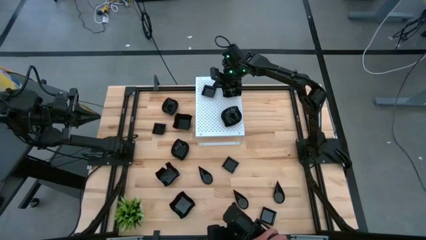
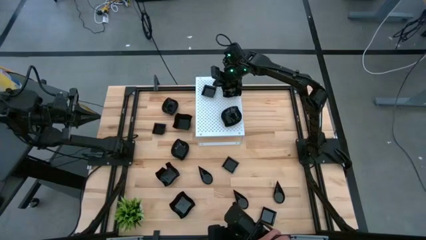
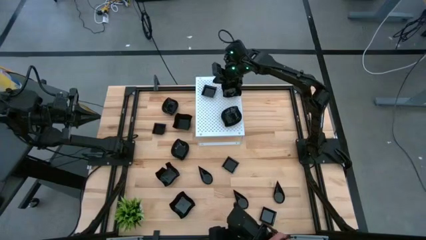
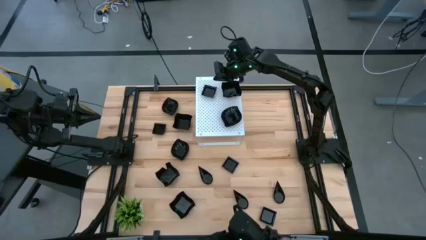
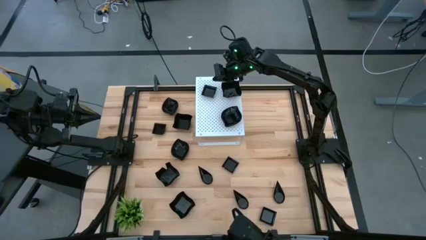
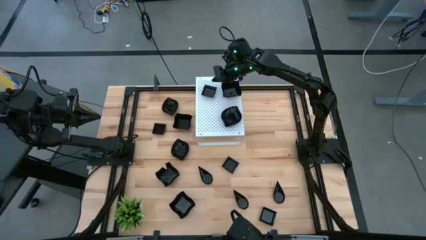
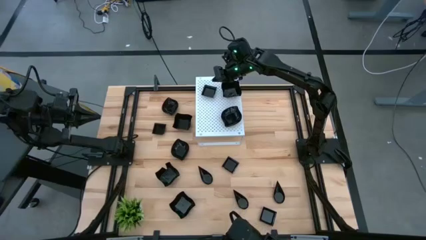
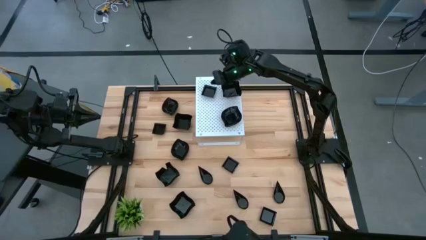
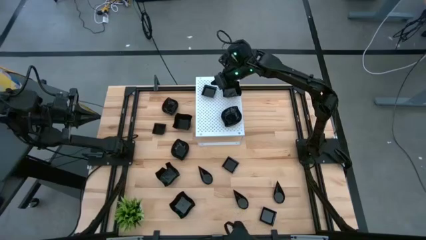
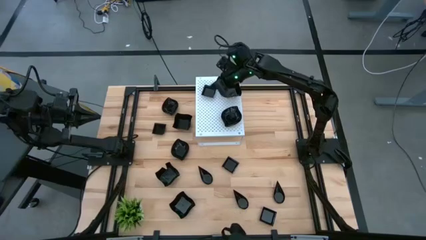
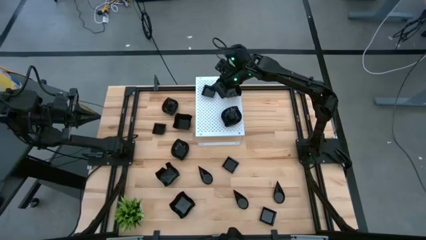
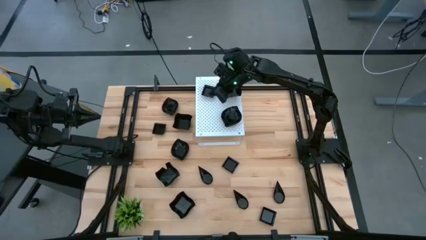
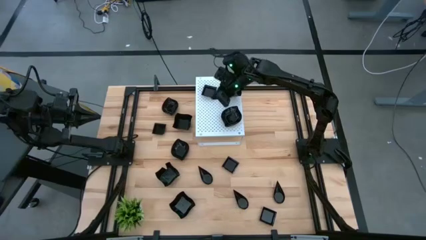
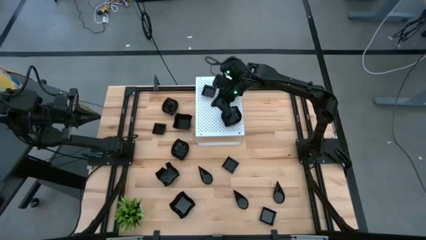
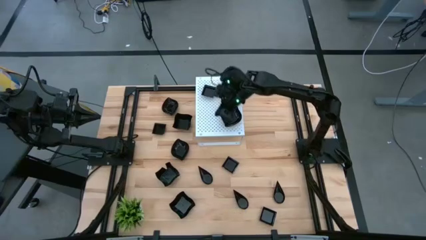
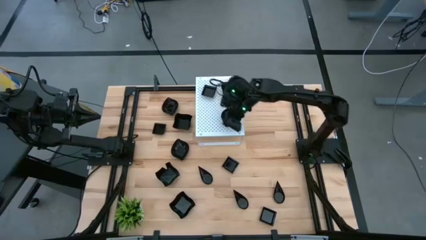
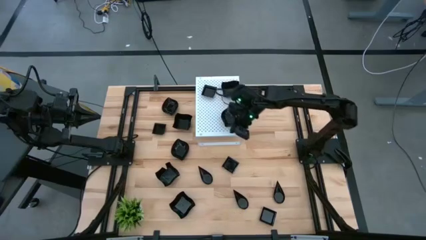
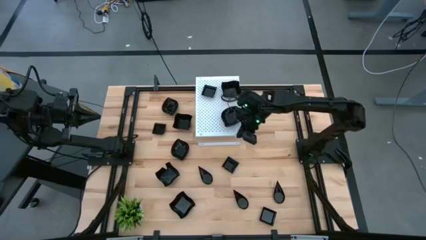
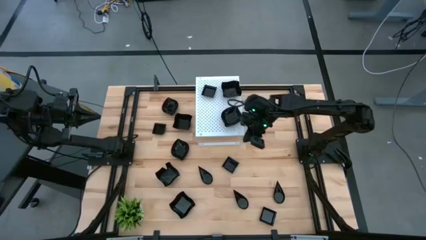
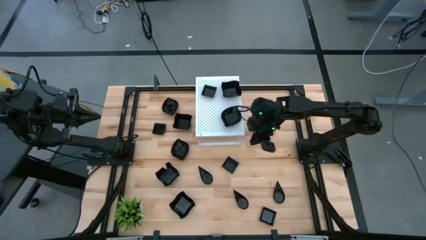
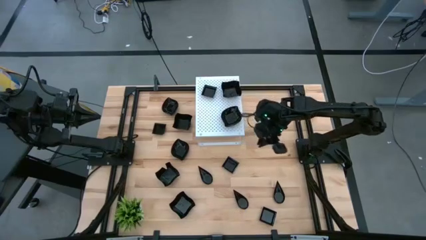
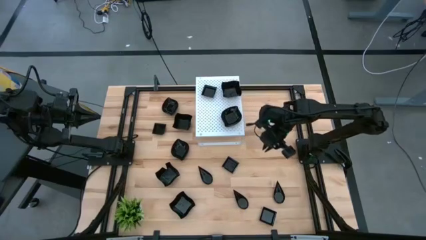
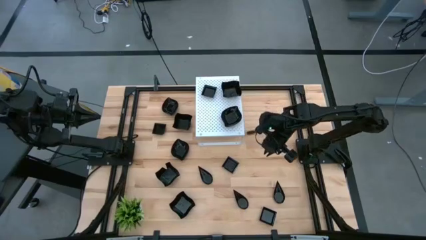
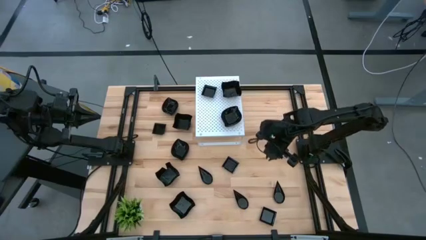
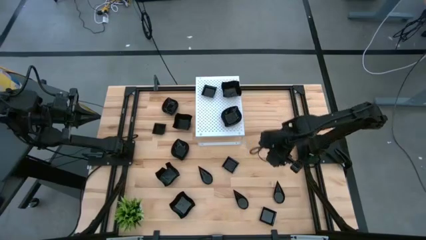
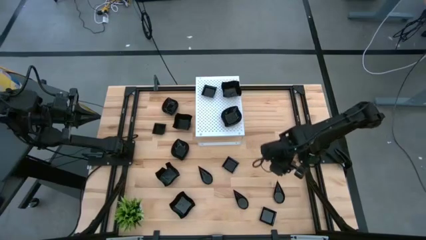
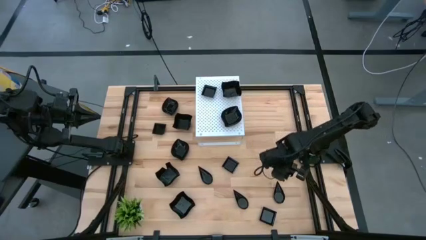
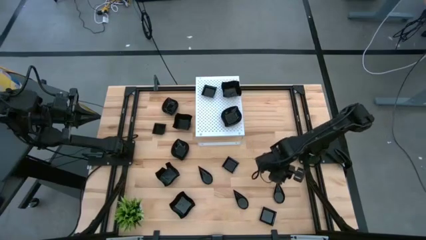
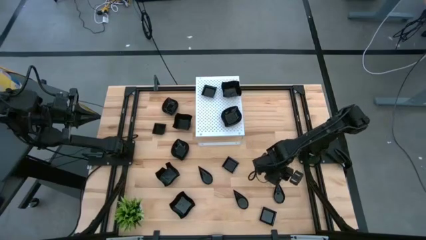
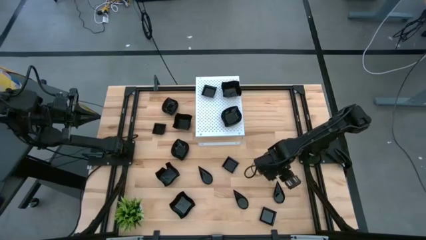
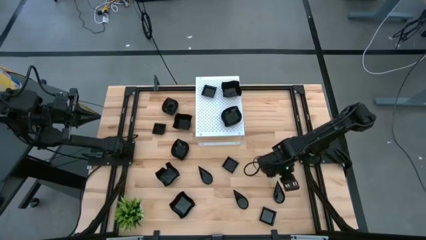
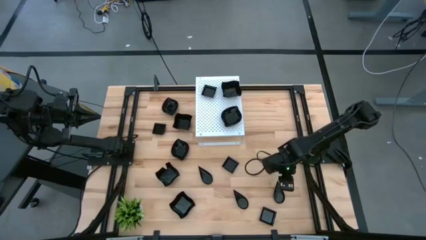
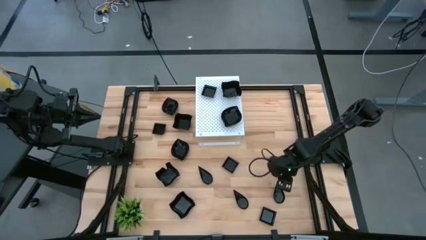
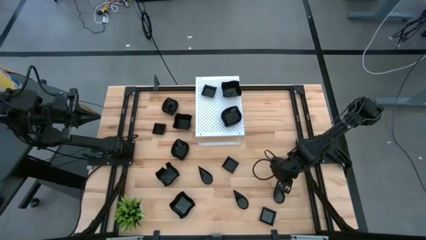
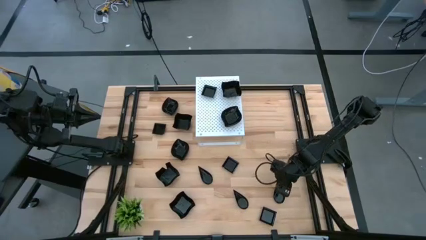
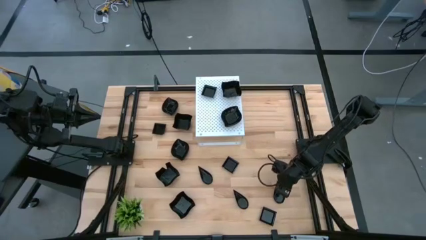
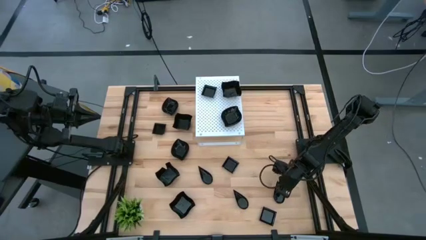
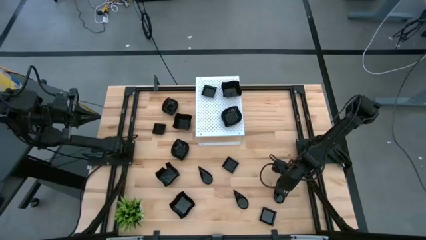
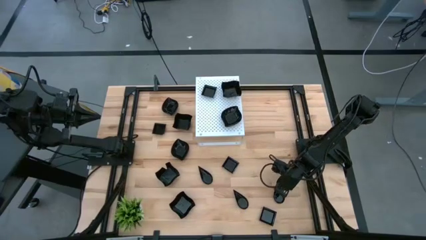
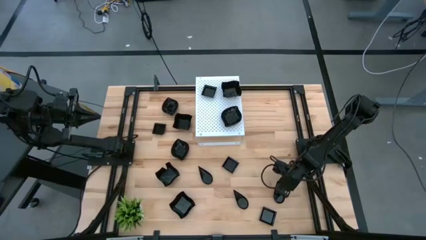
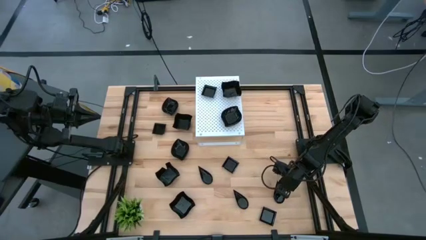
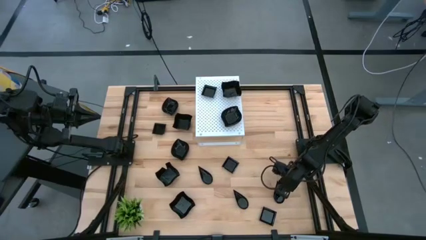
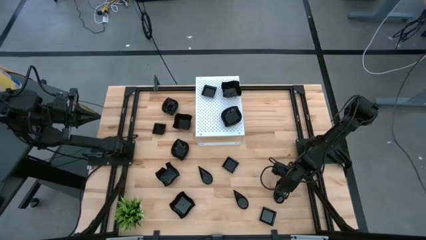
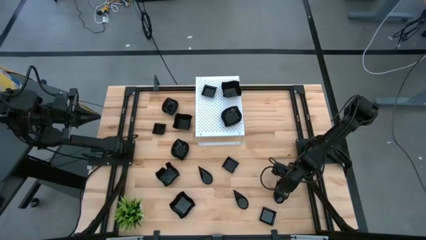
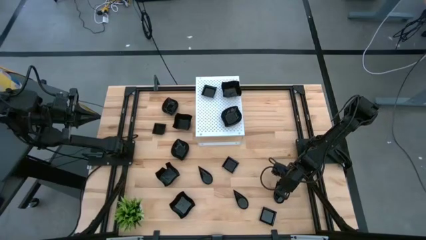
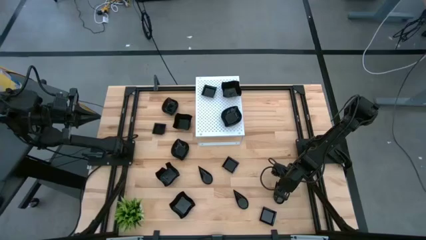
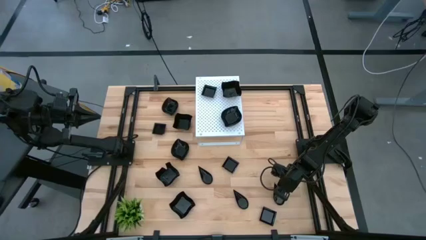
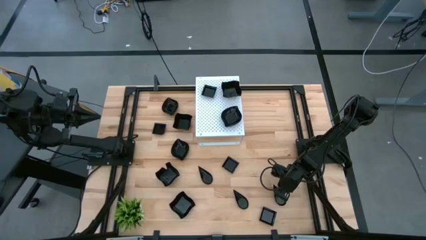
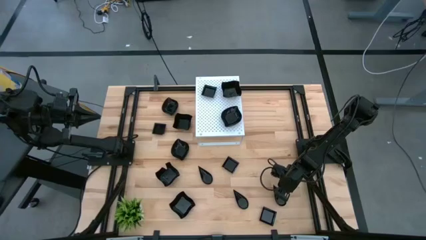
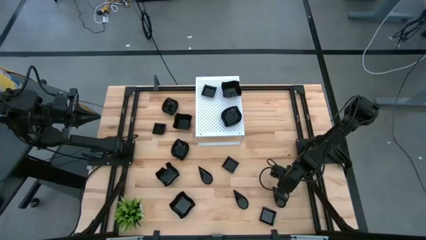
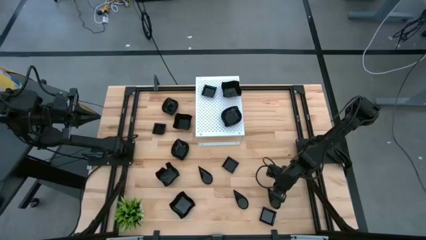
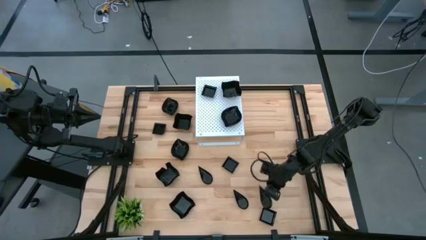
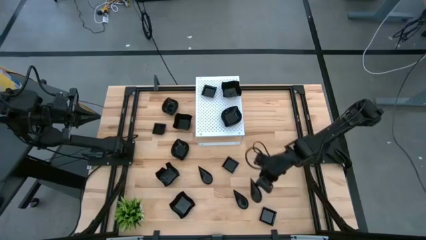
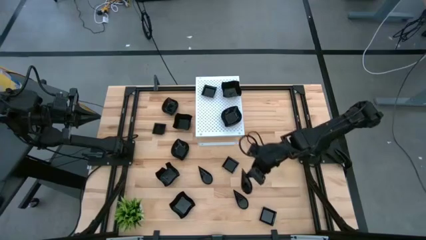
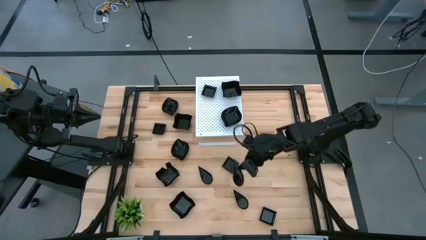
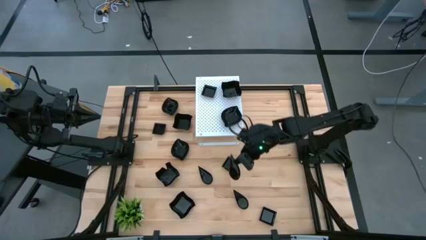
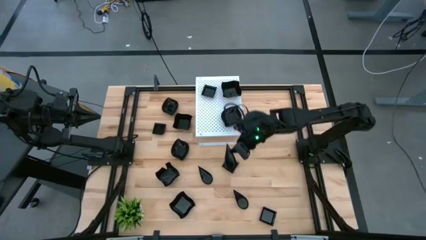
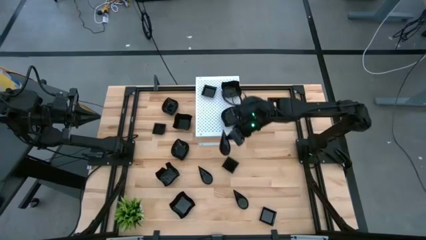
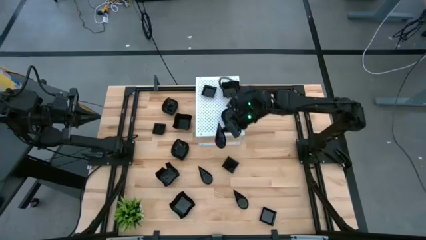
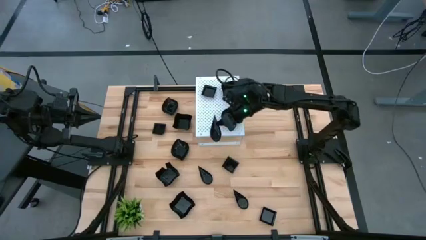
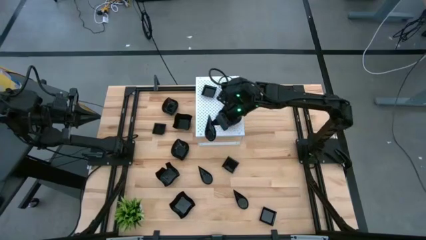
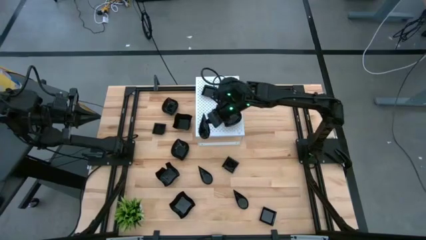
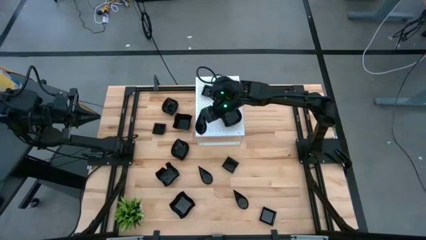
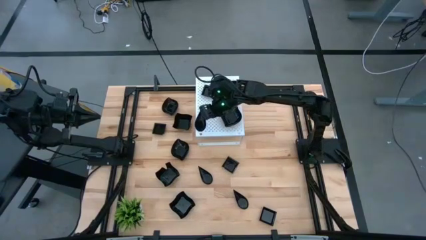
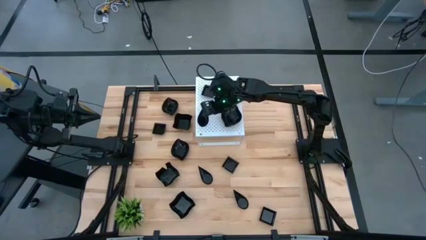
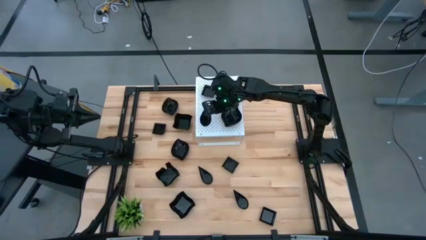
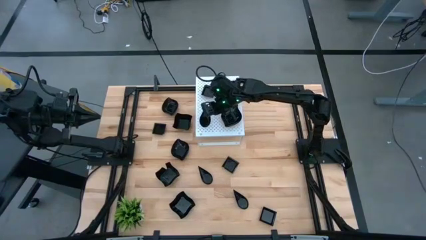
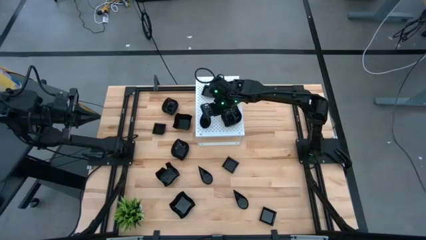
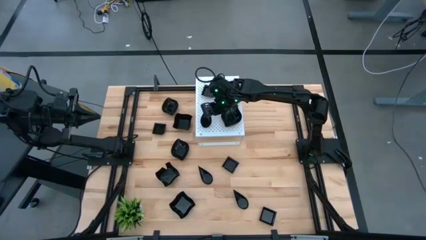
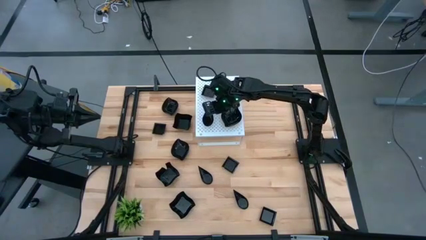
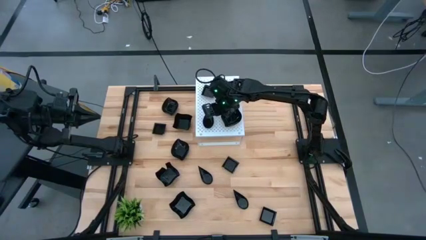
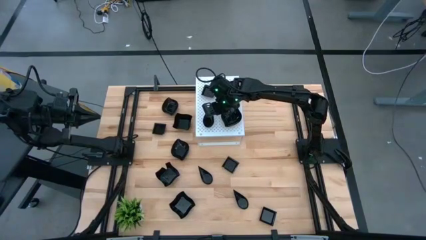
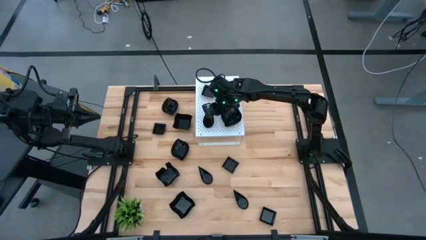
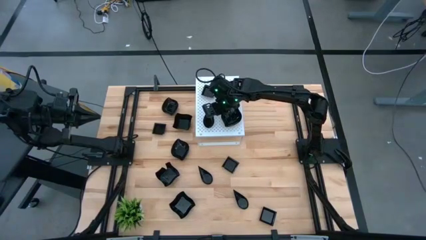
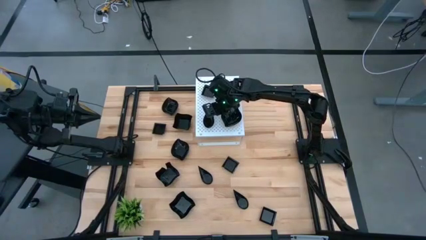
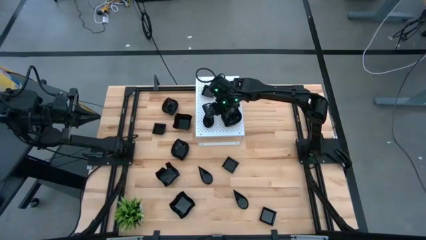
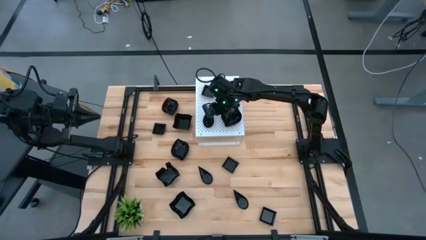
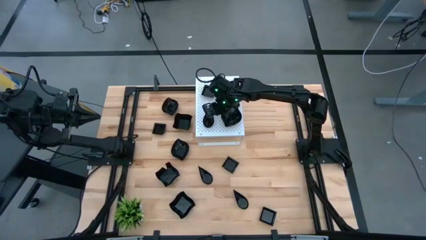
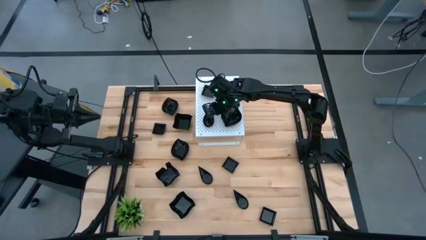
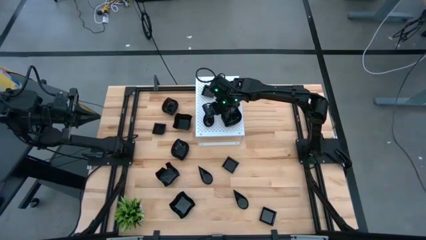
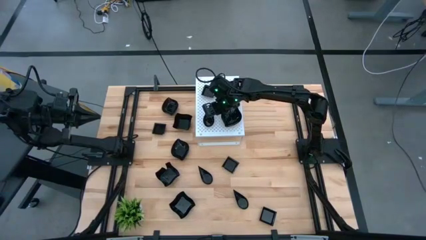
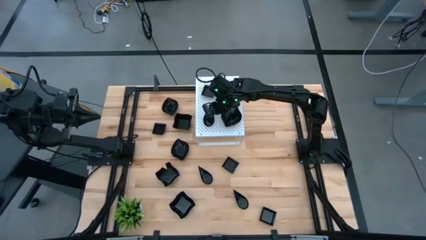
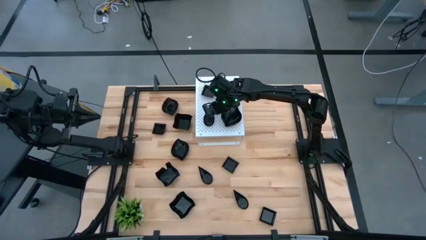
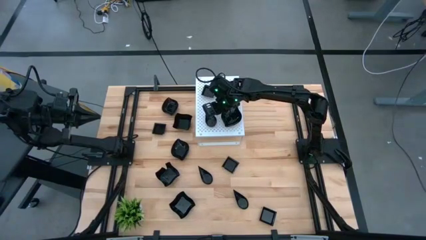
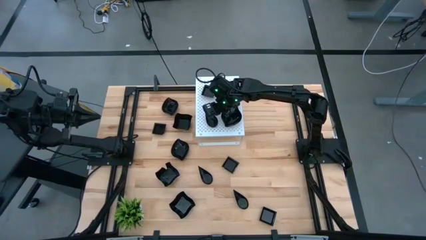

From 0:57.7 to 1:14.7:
Task: Pick & Place Mini shaped plates
Put the drop-shaped plate on the shelf
